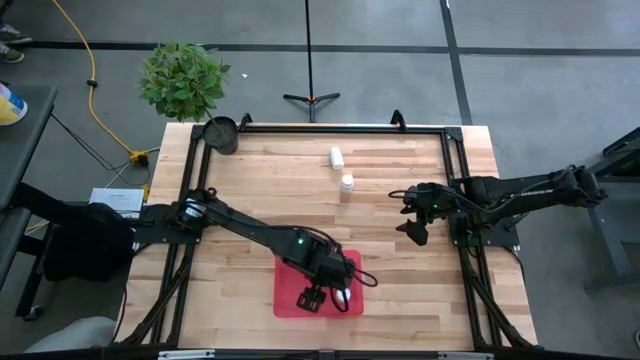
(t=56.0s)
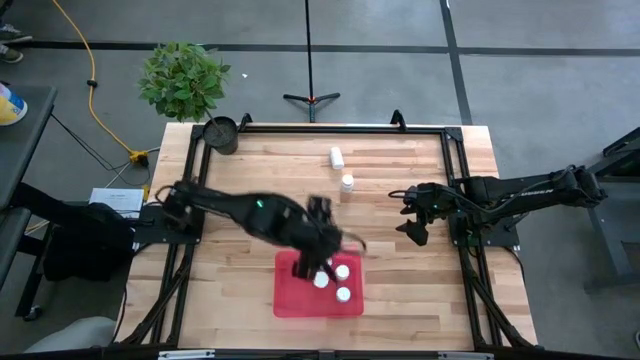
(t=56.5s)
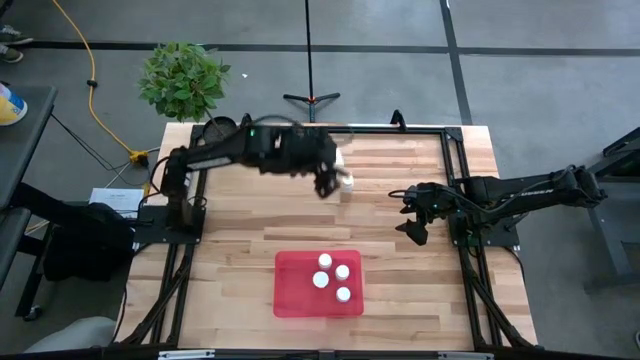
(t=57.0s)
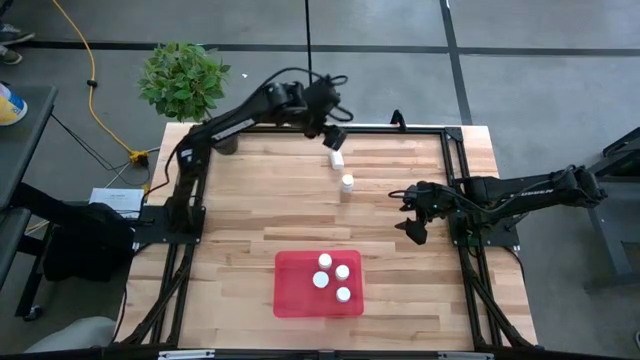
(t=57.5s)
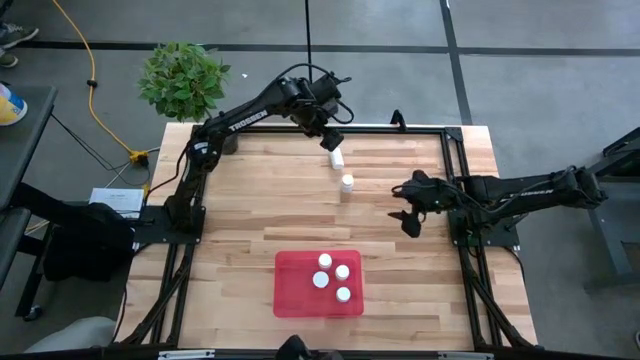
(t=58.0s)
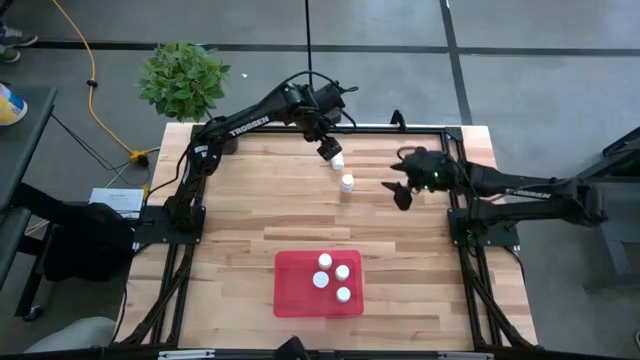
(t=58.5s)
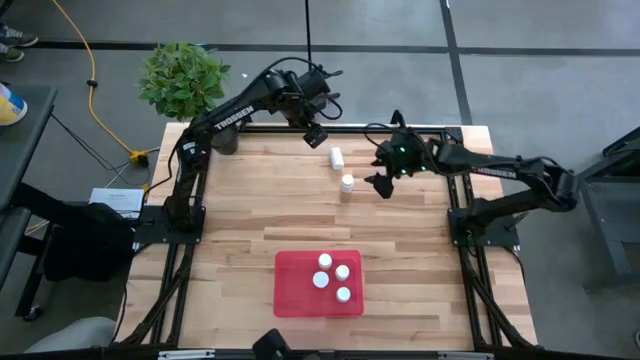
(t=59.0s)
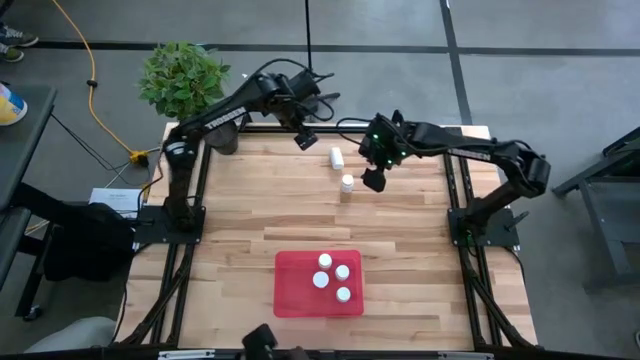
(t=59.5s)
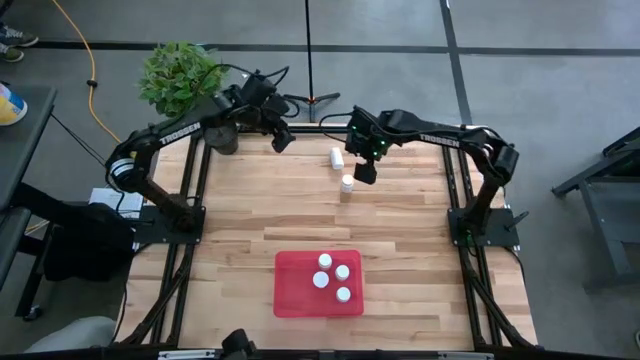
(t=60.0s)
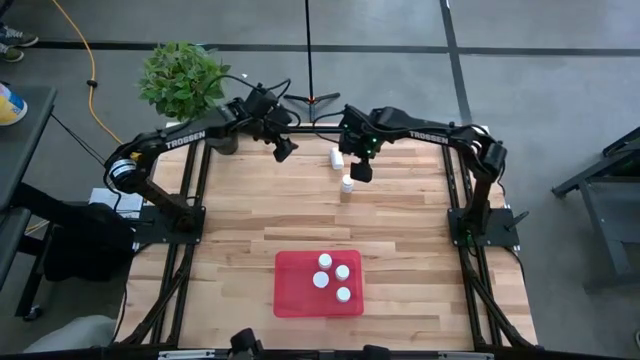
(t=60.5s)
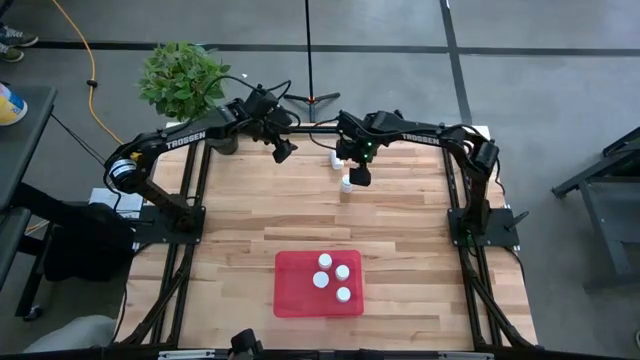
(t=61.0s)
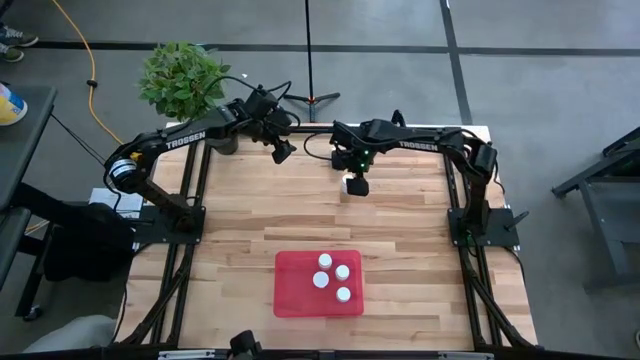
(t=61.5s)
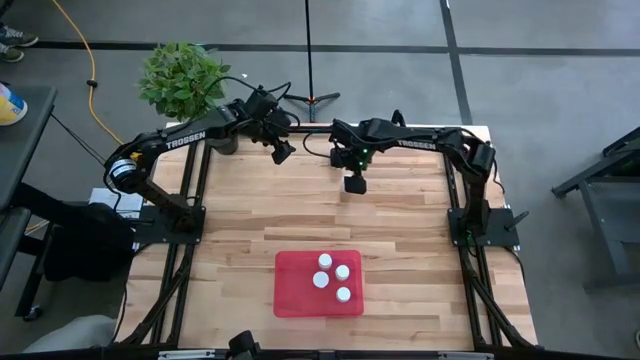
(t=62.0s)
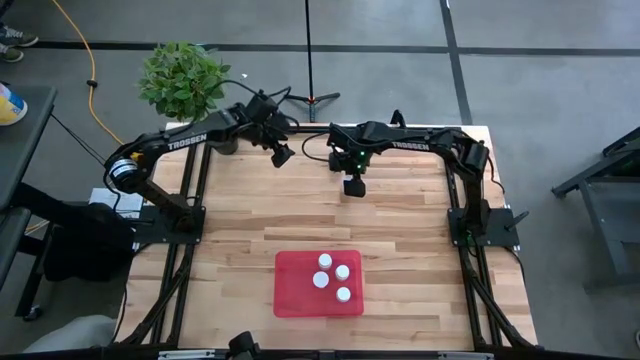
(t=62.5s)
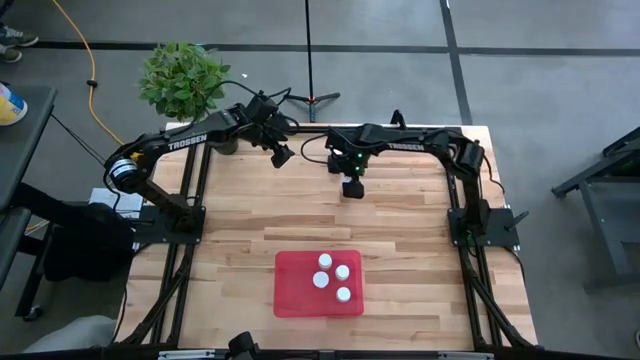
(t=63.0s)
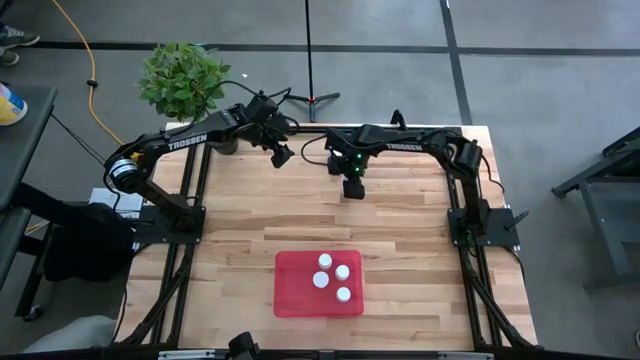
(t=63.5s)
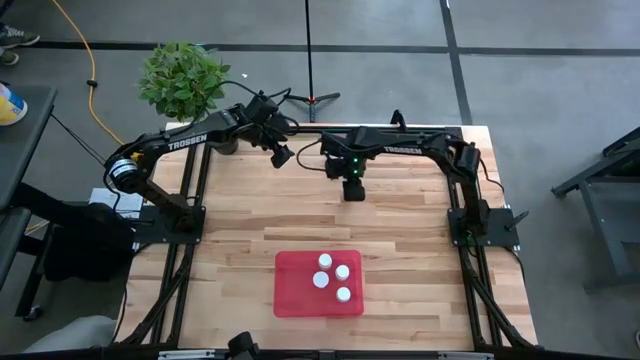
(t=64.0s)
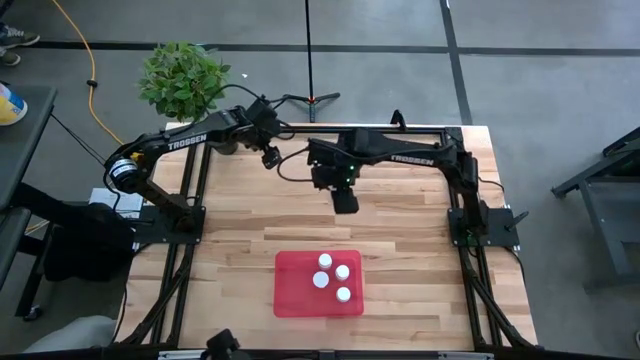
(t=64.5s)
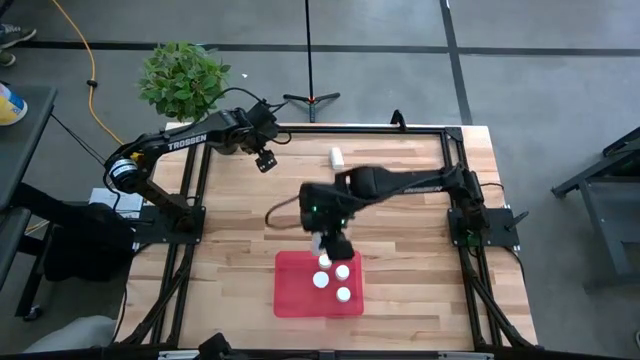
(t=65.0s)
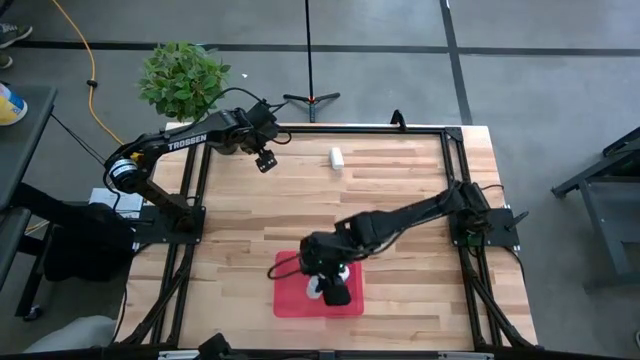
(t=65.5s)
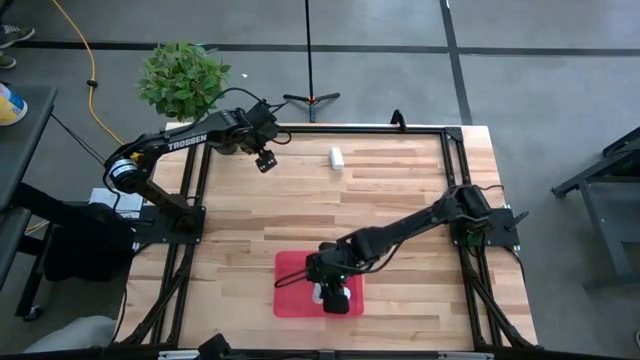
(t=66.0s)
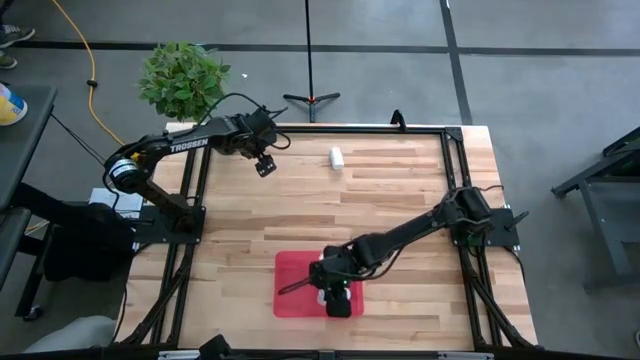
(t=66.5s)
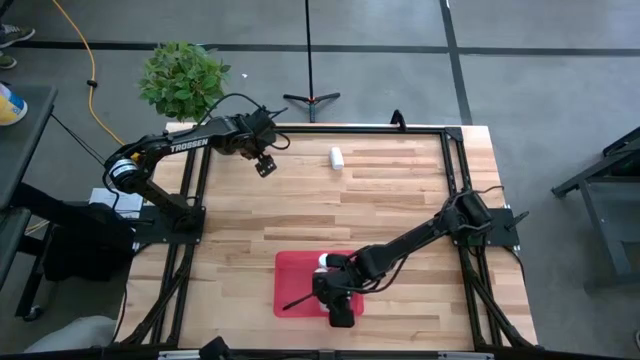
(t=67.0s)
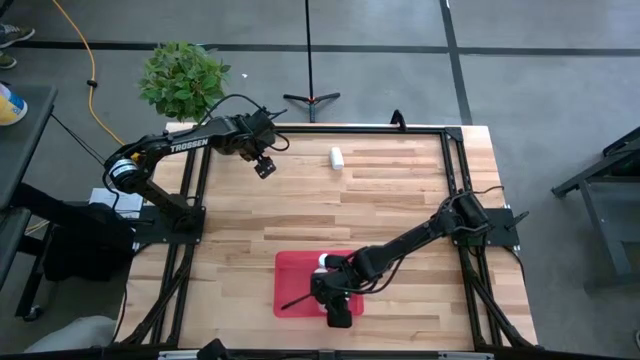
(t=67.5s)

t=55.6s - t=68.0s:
Task: Pick and place pill bottles into a basket
Put the white medicine bottle into the red bin

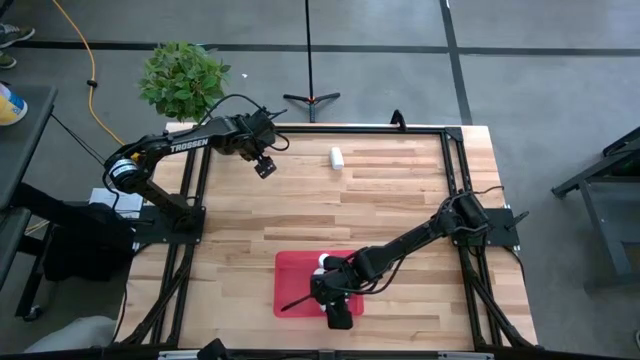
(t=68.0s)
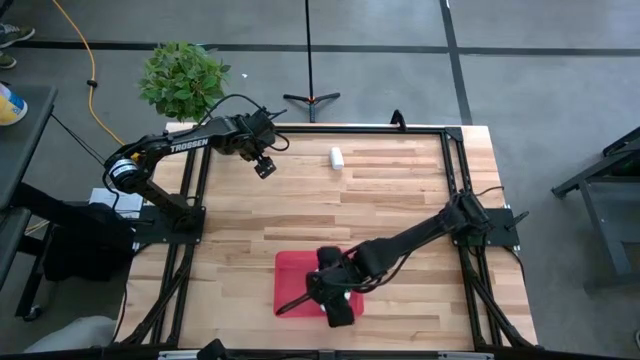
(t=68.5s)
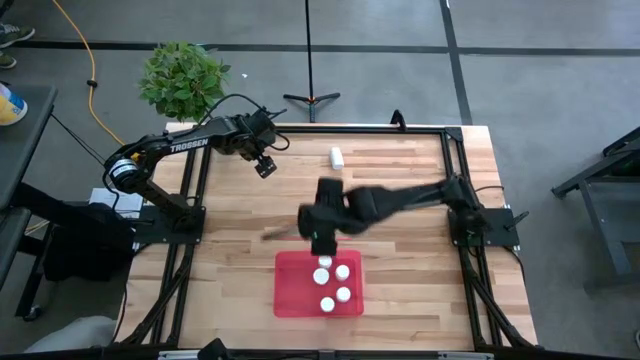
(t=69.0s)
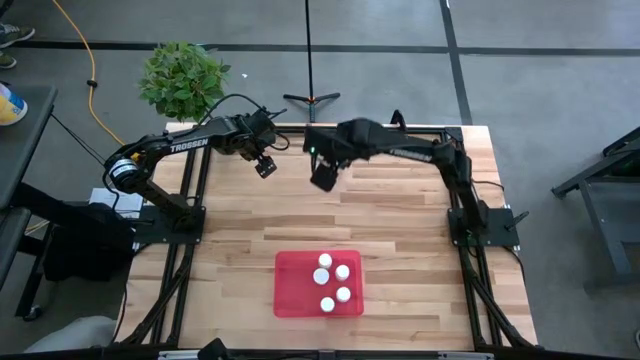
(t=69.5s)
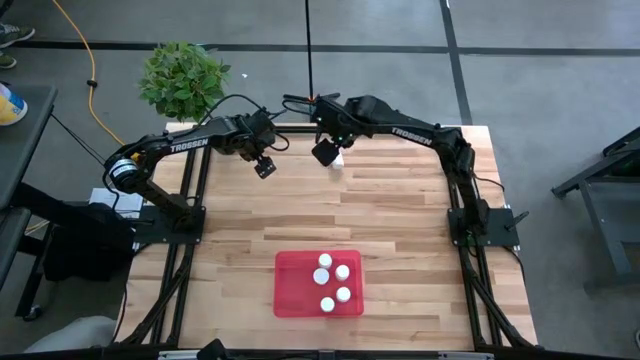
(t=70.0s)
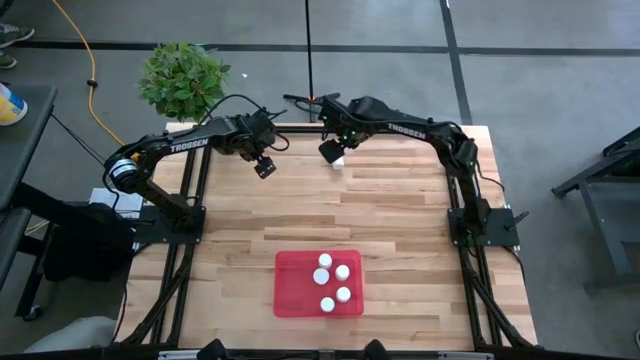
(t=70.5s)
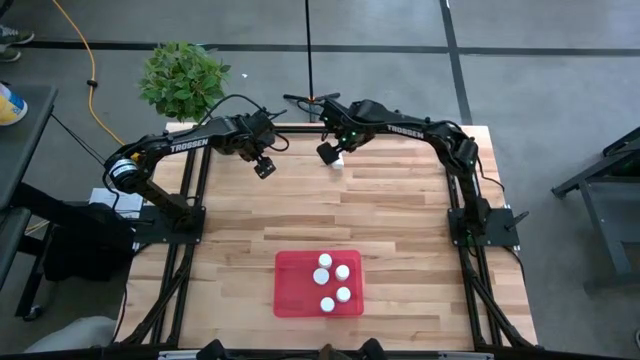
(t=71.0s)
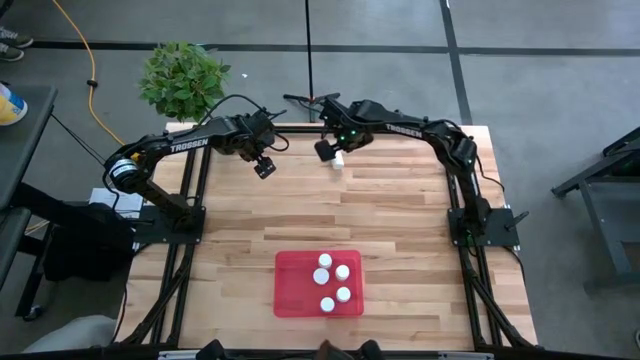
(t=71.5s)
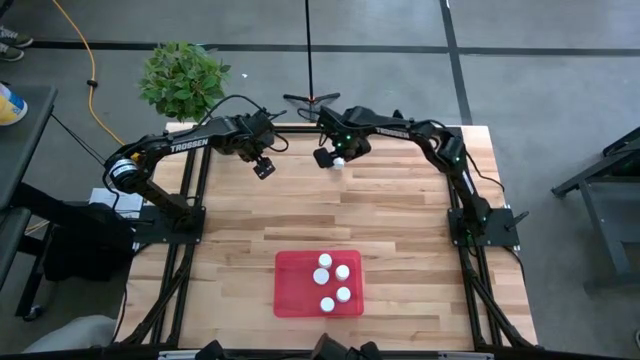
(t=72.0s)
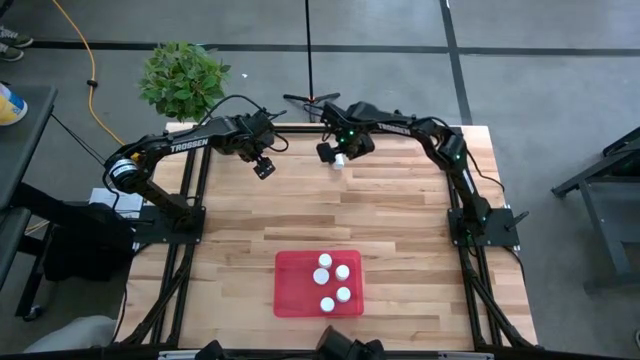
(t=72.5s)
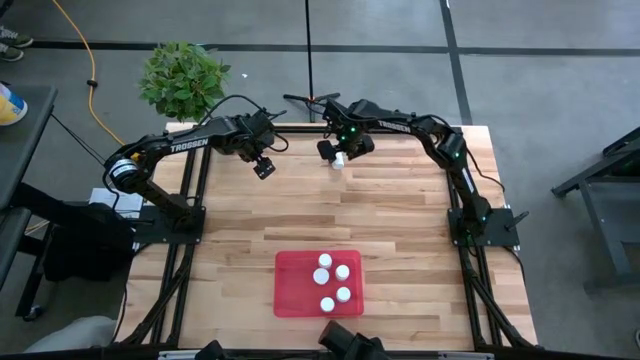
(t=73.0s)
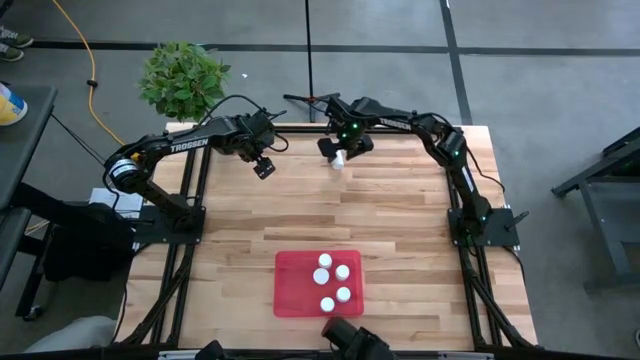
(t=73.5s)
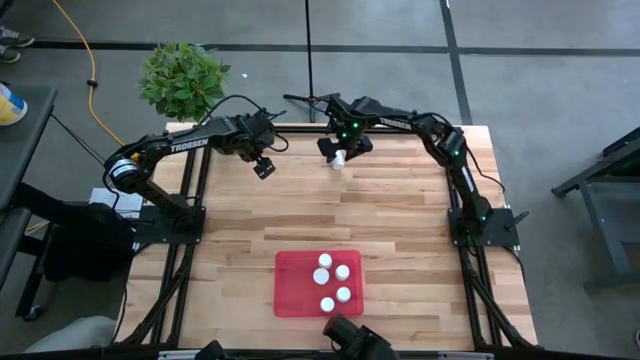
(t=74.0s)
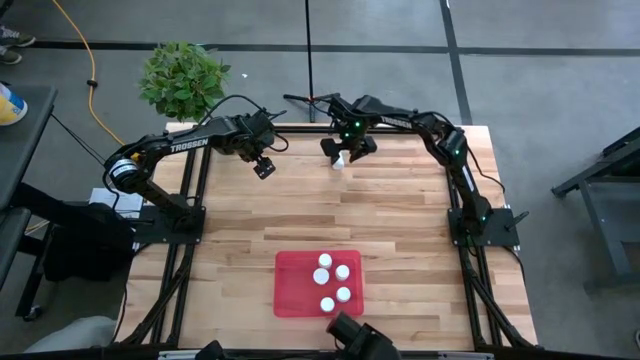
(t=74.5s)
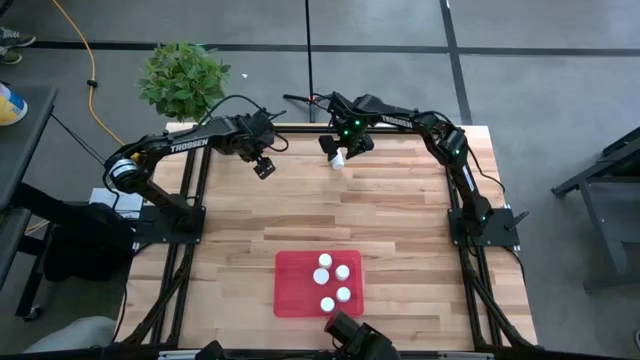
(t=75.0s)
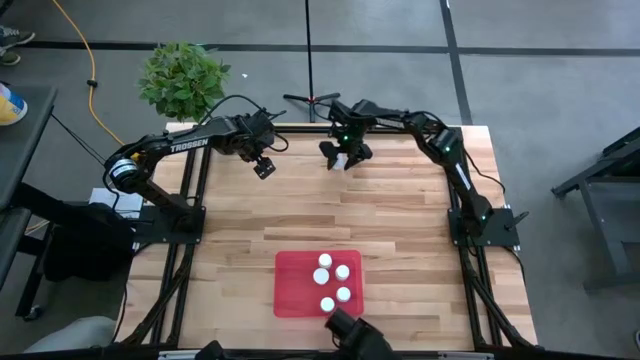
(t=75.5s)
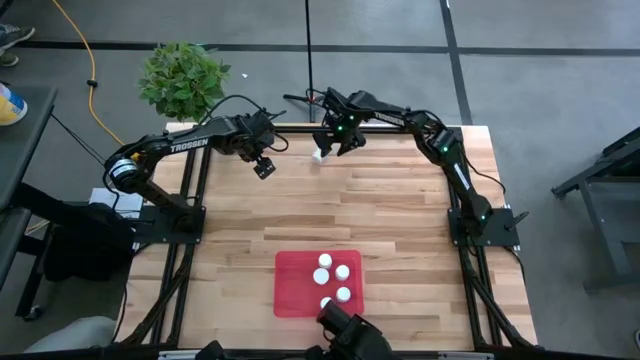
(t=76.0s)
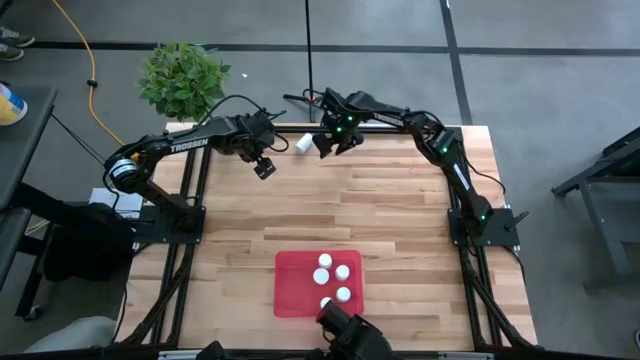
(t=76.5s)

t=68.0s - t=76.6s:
Put the white medicine bottle into the red bin
